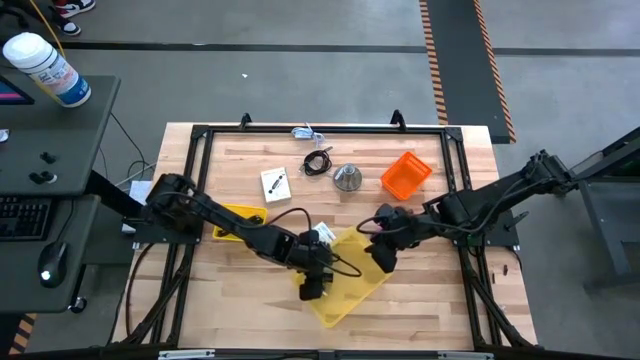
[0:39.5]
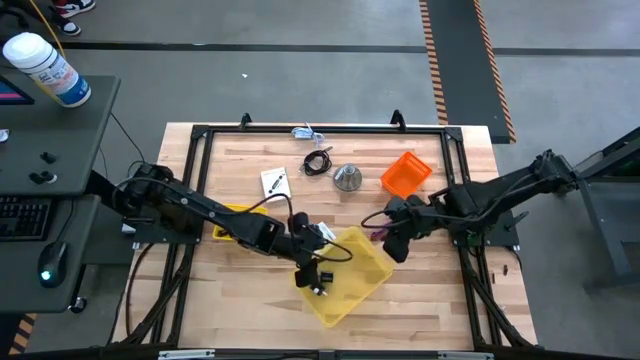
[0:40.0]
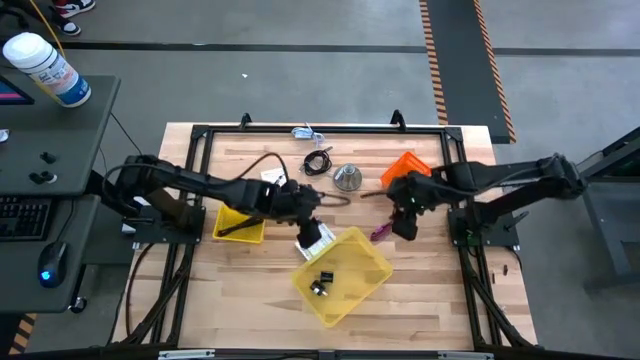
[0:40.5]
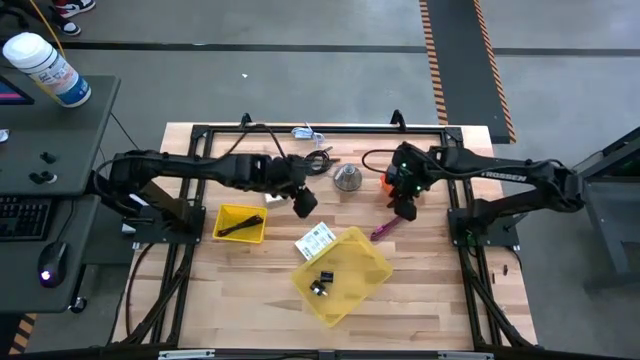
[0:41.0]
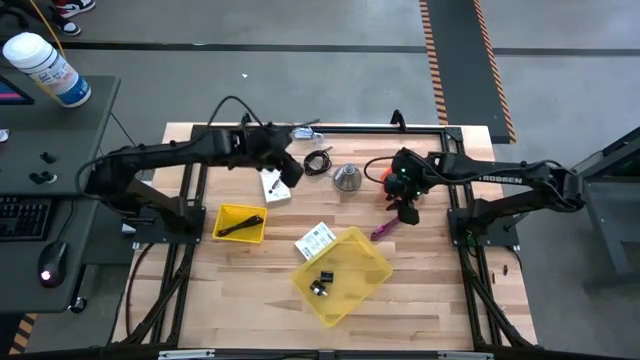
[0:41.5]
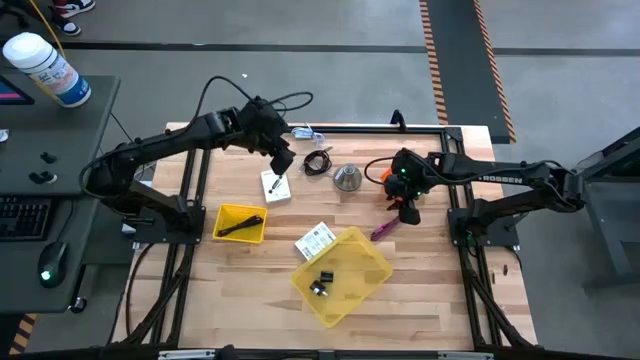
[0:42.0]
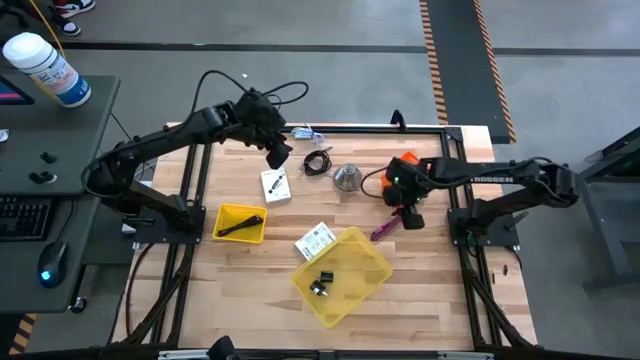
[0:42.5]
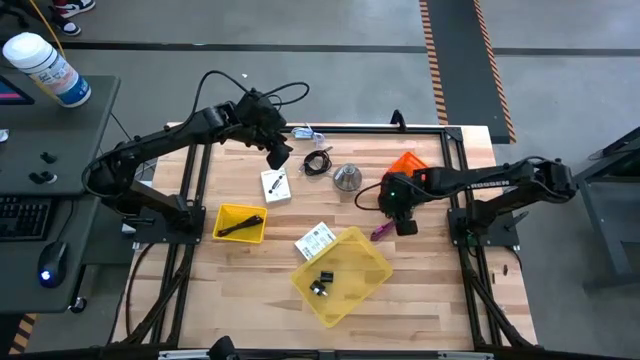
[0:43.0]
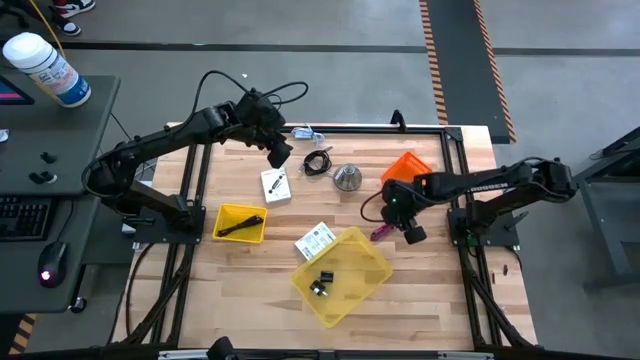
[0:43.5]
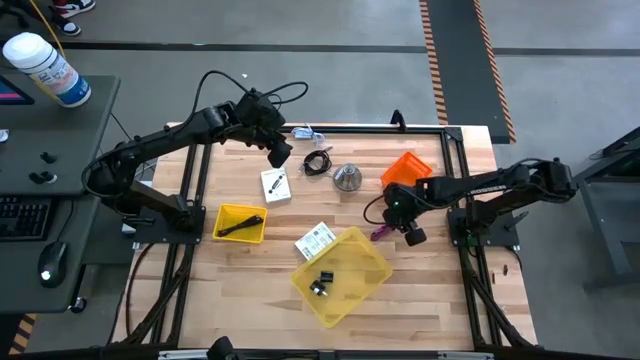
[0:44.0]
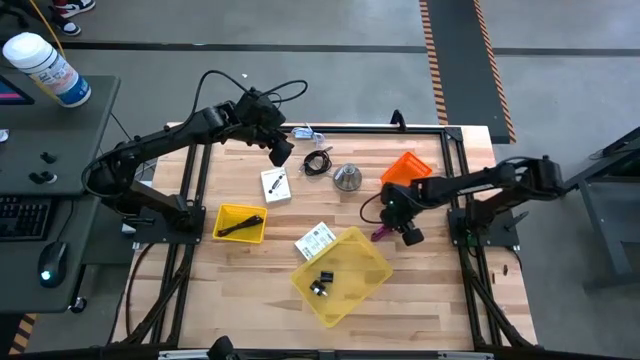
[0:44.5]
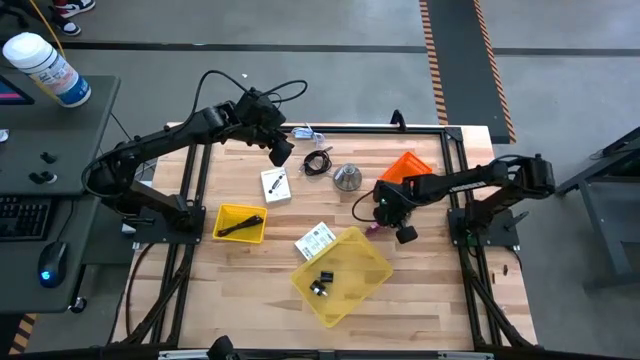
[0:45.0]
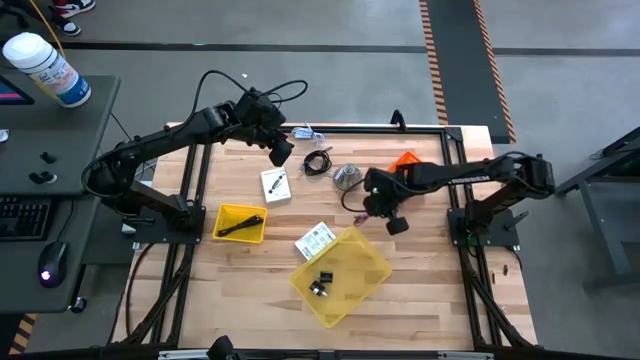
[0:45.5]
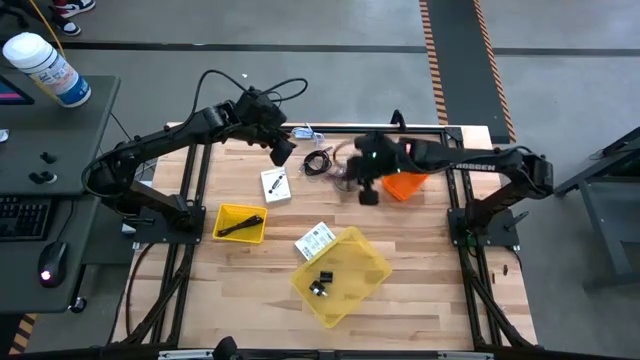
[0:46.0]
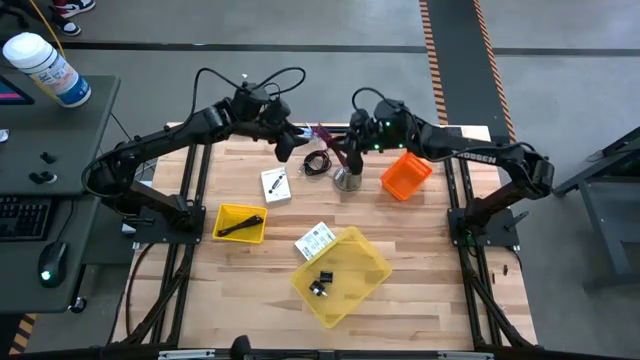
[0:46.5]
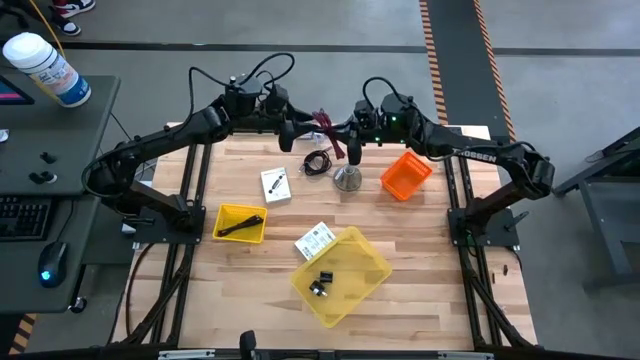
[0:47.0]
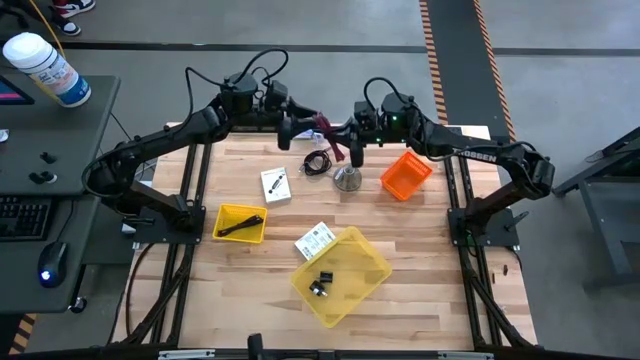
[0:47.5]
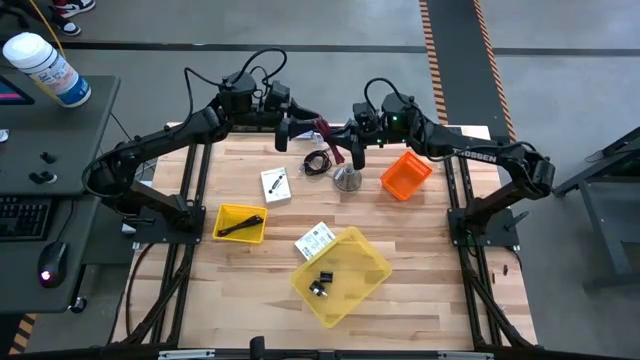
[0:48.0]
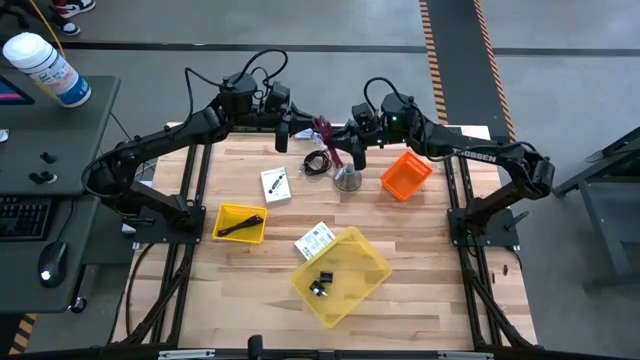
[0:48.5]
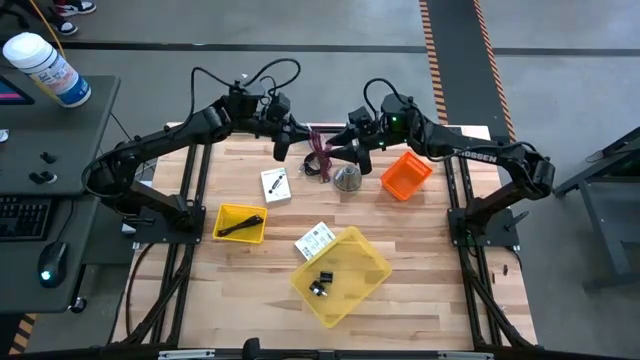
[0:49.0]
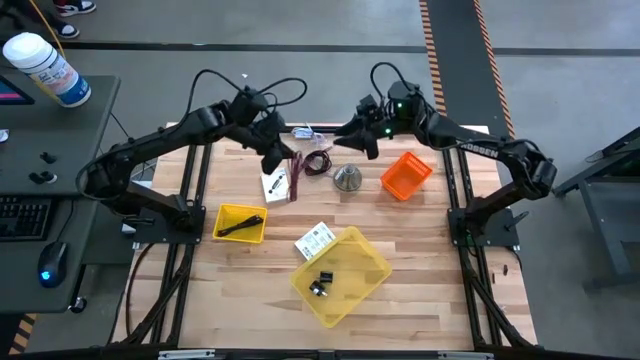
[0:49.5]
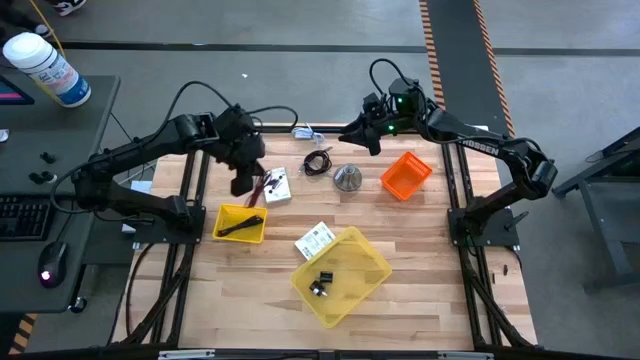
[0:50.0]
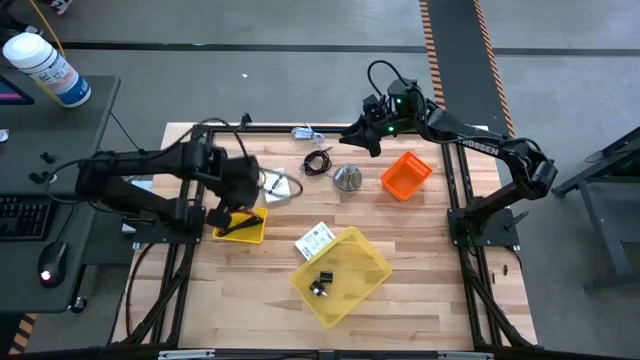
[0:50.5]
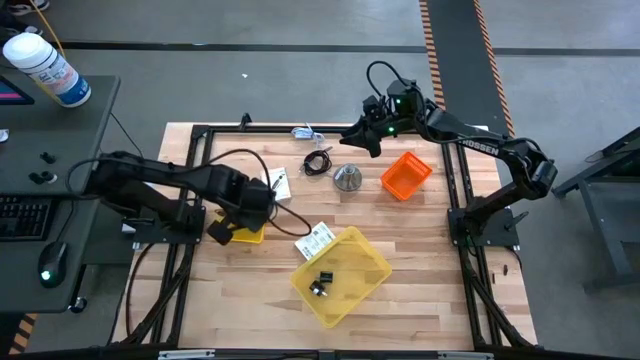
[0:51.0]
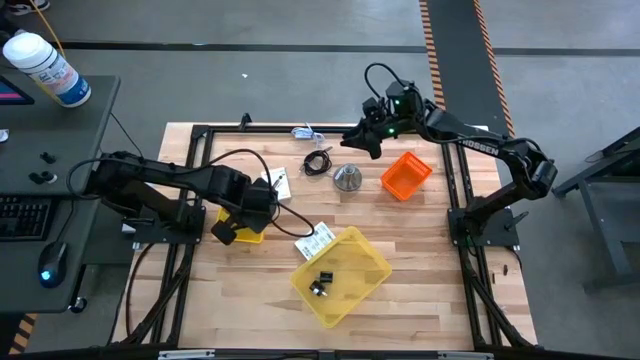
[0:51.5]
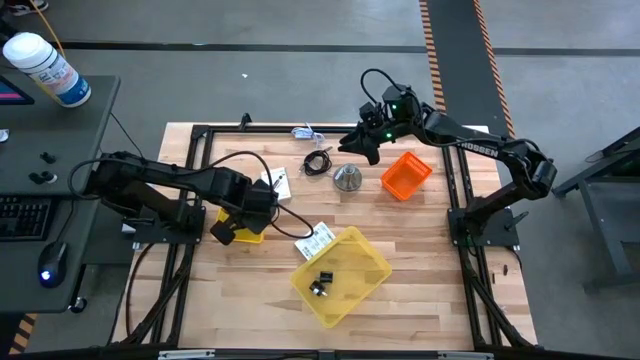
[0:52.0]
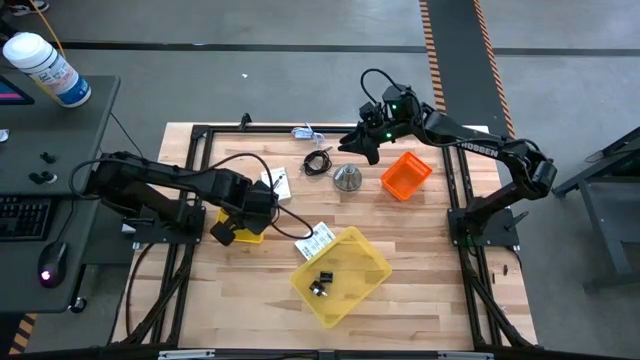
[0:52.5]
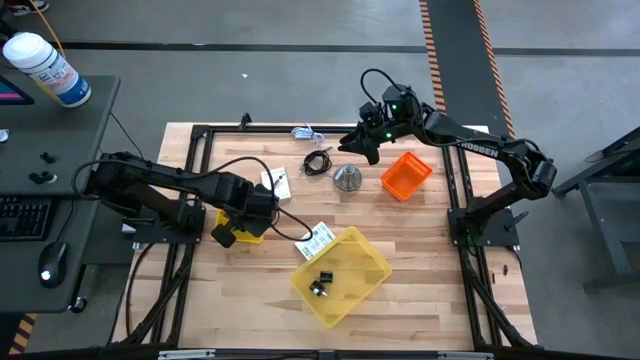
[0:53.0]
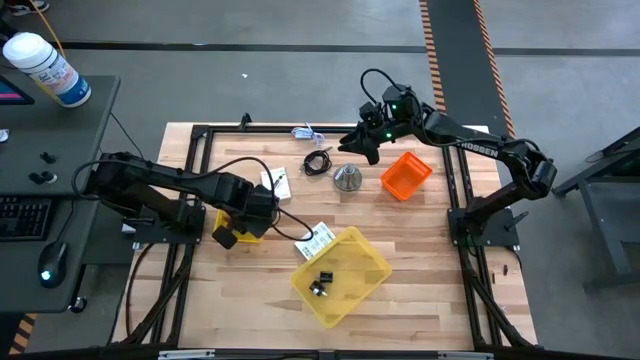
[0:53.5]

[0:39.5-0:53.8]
Task: Pick and place items into bin
Put the purple cable charger into the left yellow bin
